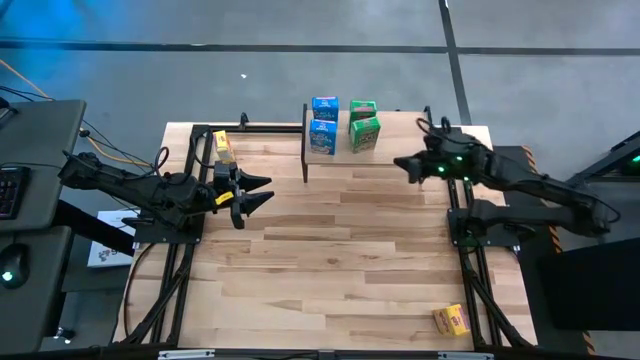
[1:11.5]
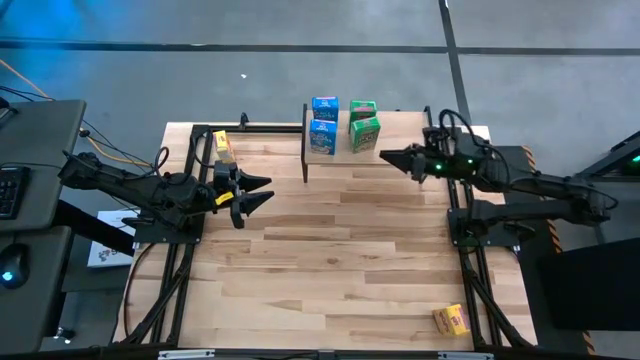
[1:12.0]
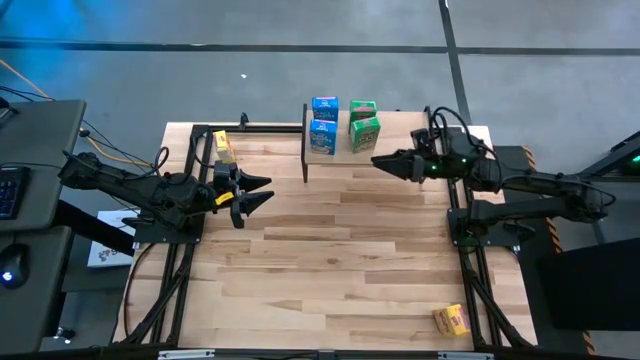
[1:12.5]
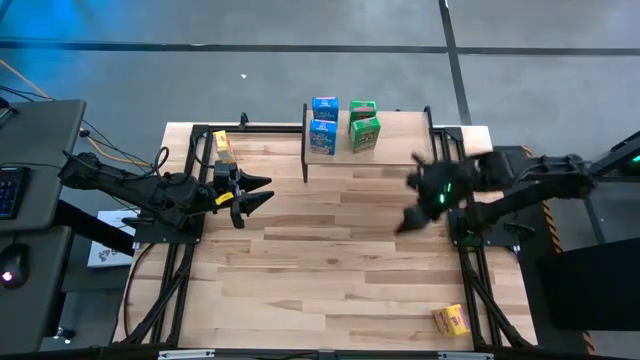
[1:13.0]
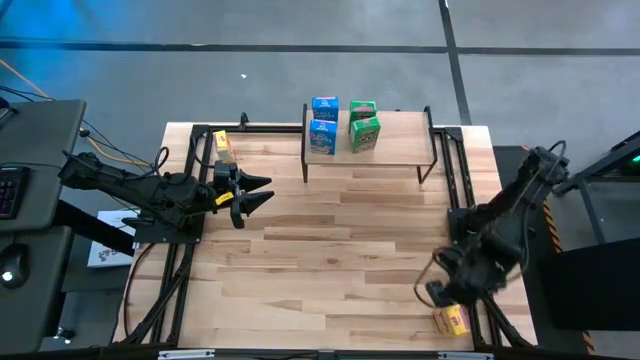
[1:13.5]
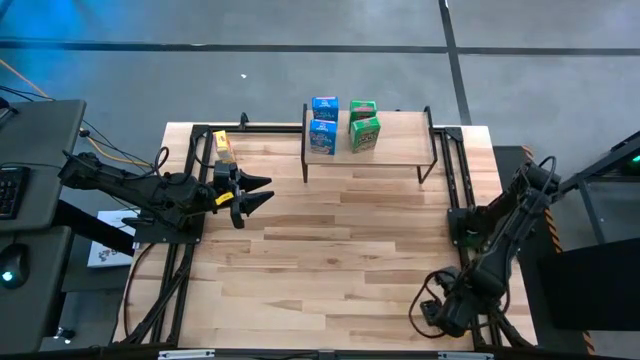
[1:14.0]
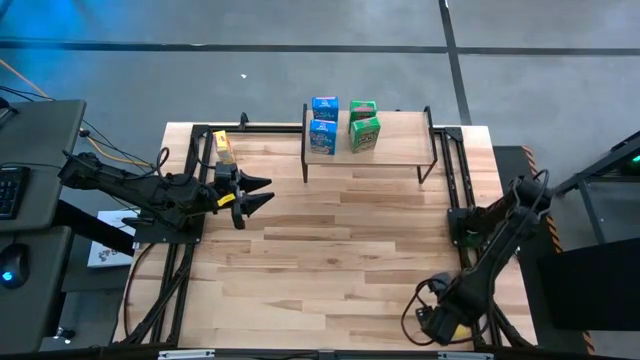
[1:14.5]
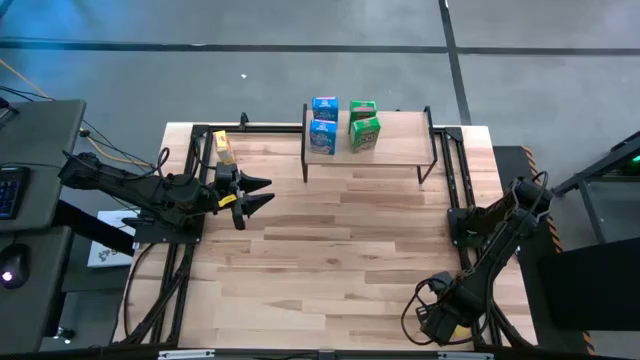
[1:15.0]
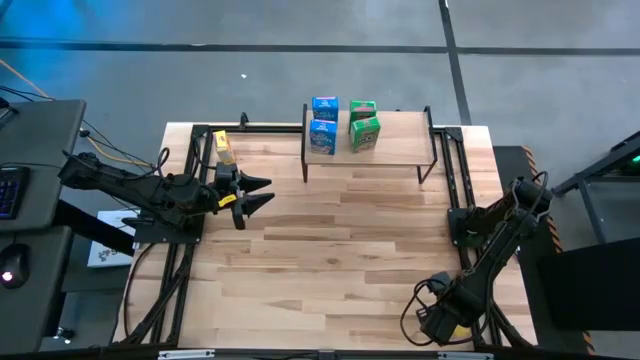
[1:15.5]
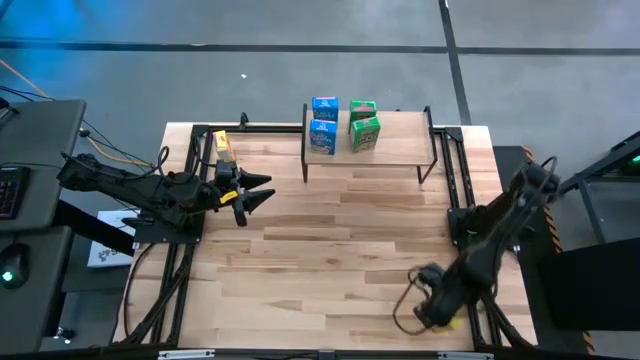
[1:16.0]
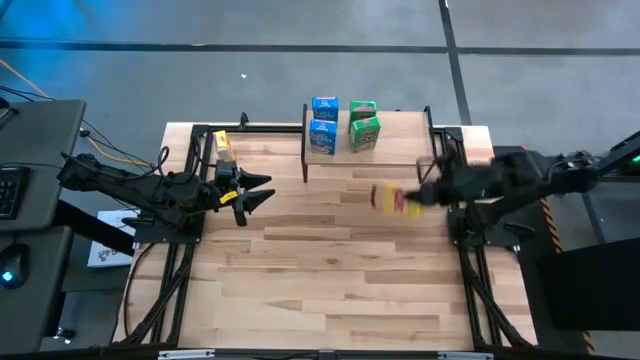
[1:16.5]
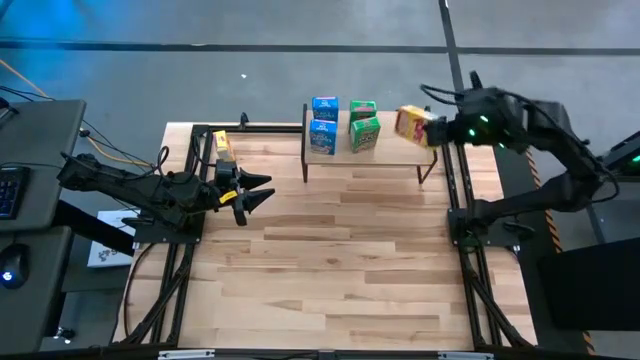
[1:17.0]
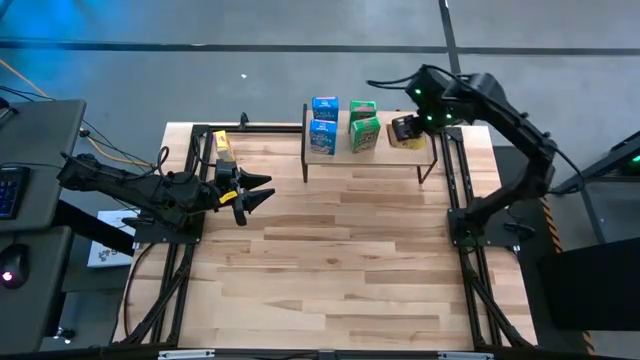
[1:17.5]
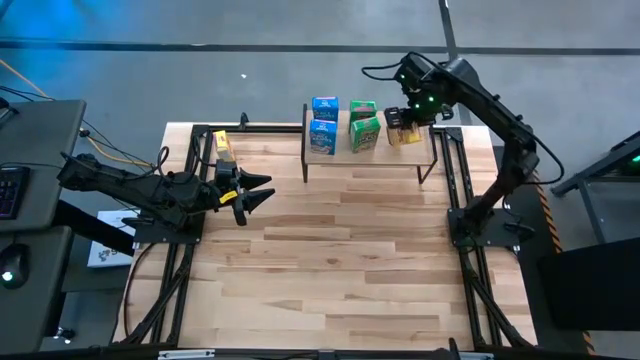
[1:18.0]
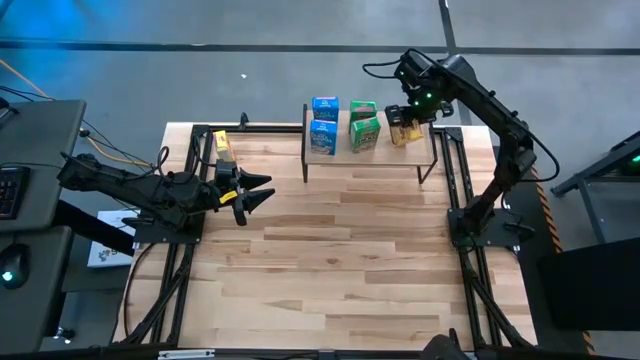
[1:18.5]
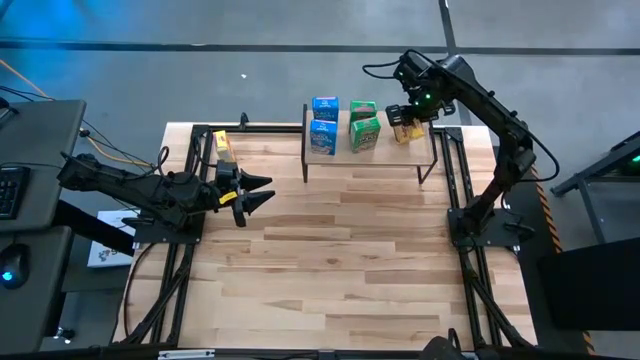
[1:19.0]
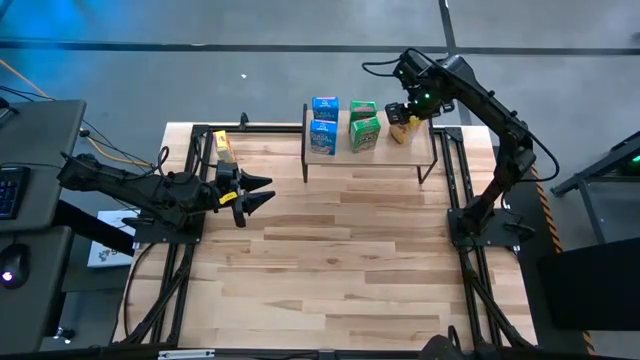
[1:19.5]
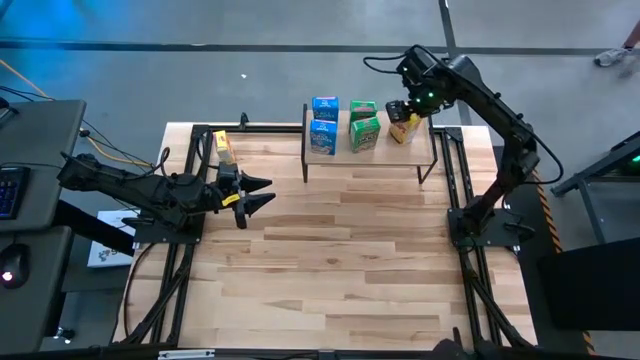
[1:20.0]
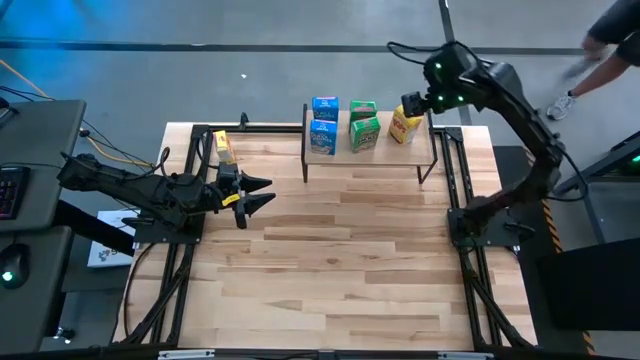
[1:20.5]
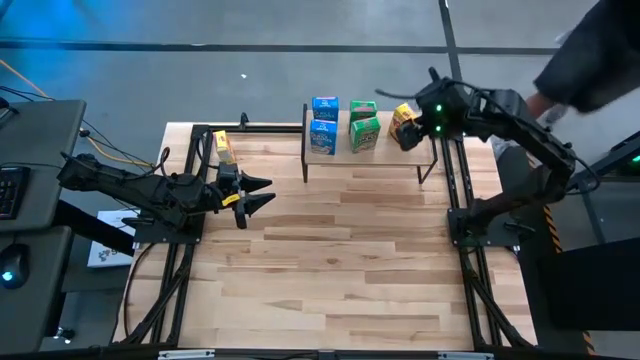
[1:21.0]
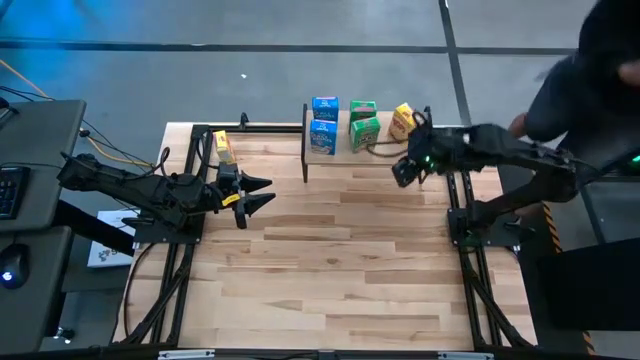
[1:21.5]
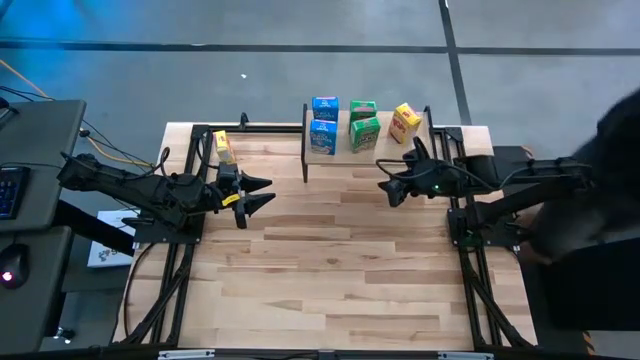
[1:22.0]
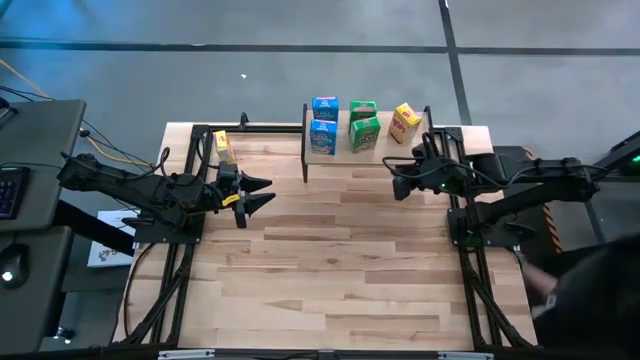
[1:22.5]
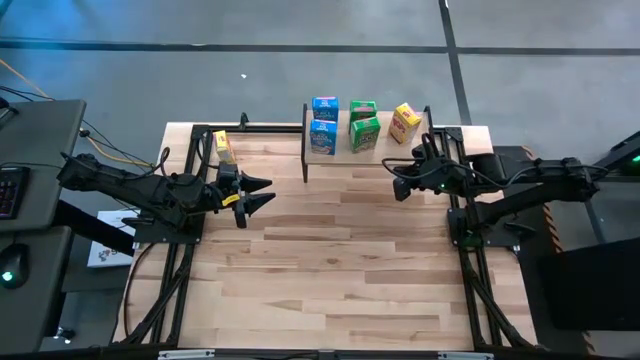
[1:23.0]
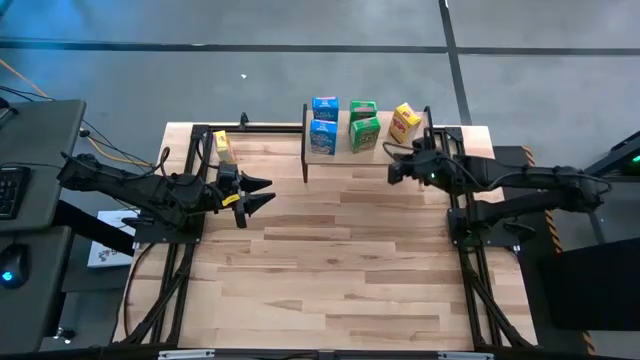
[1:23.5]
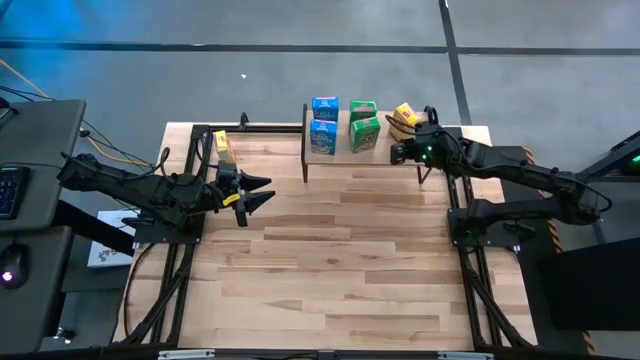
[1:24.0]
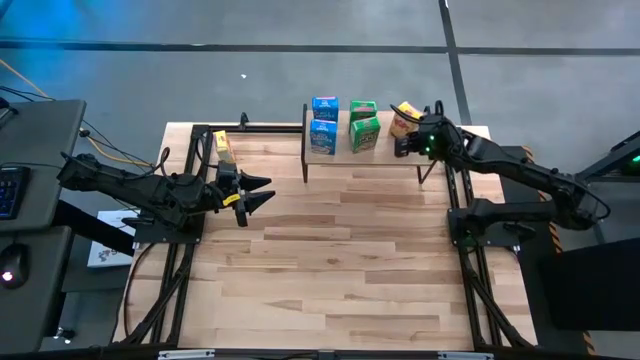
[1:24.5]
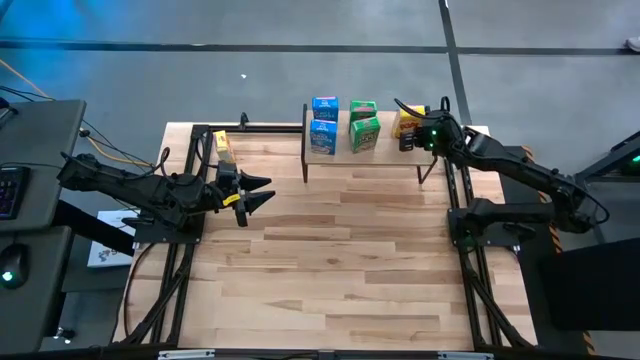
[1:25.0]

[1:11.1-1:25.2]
Task: Stack cereal on shelf
Put the bottom yellow cereal box on the shelf

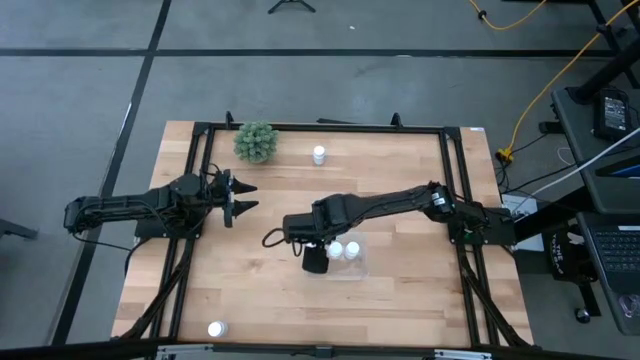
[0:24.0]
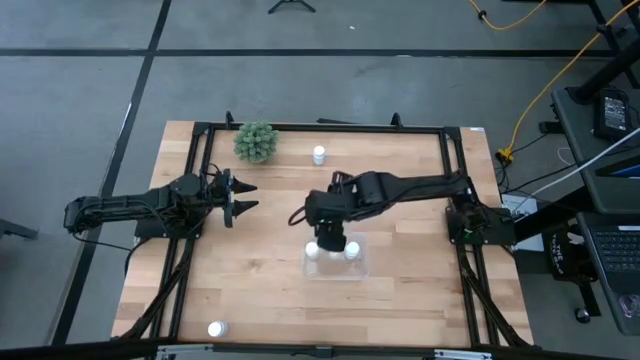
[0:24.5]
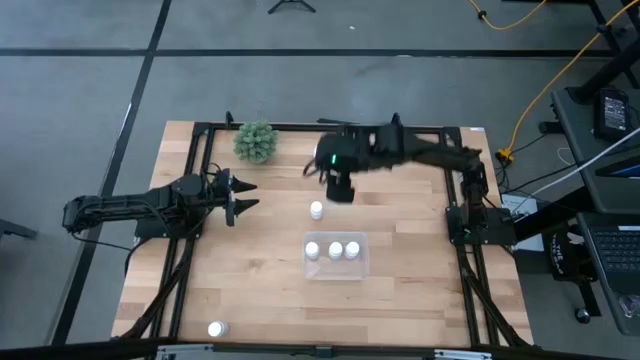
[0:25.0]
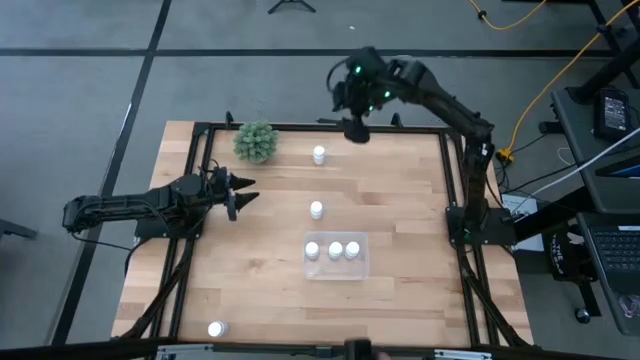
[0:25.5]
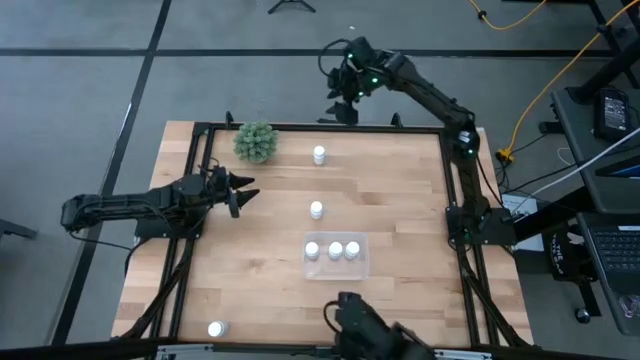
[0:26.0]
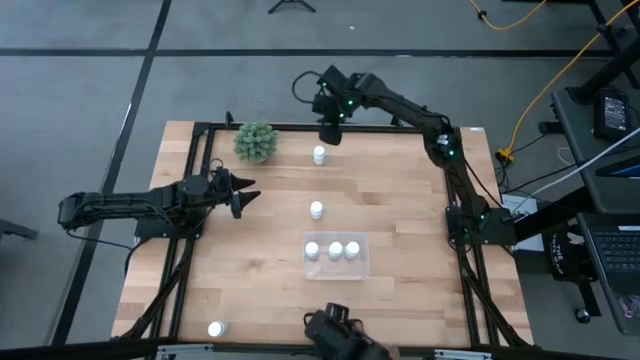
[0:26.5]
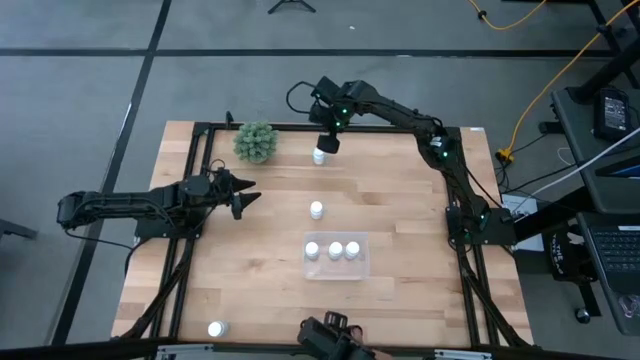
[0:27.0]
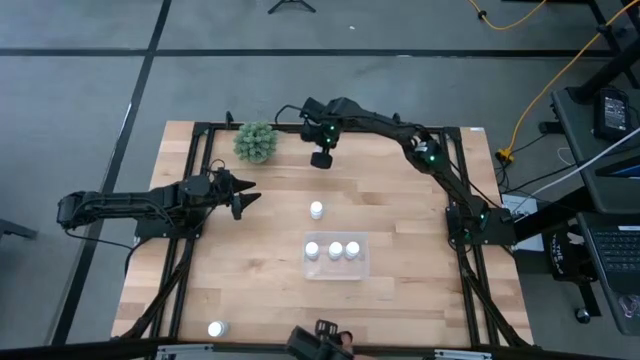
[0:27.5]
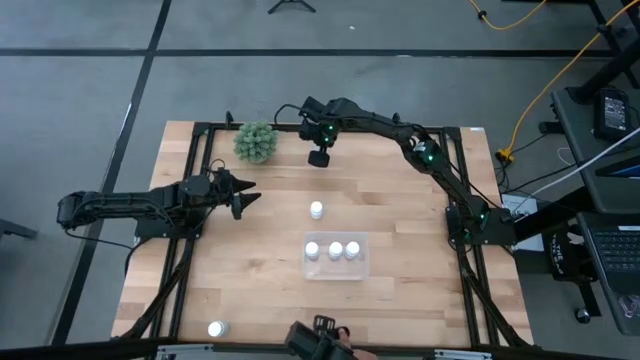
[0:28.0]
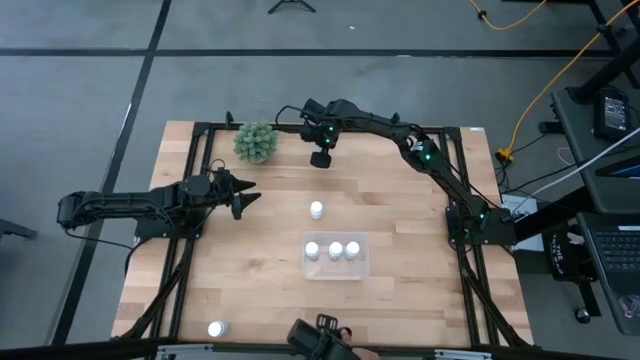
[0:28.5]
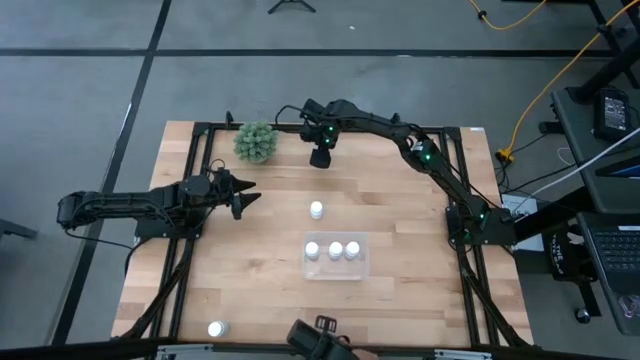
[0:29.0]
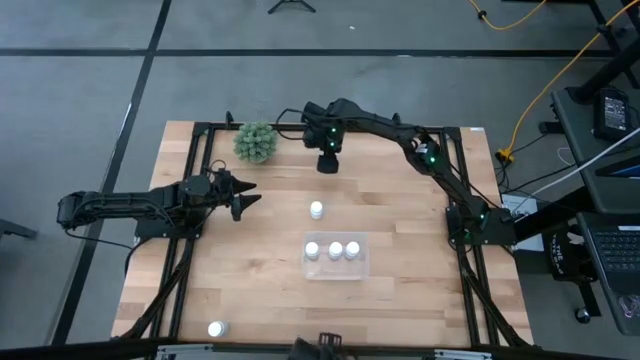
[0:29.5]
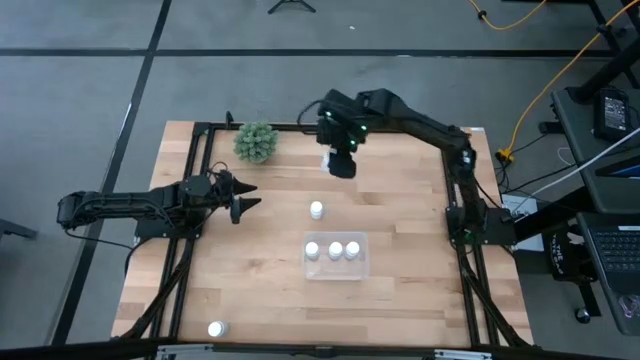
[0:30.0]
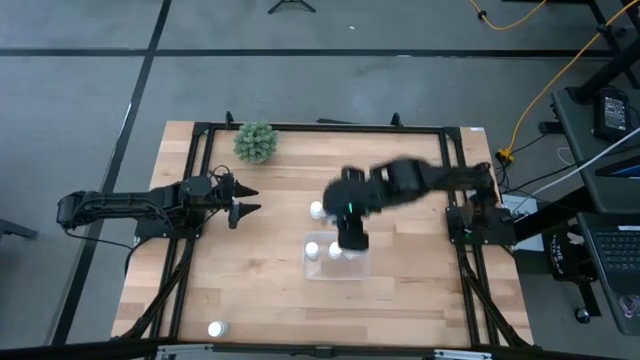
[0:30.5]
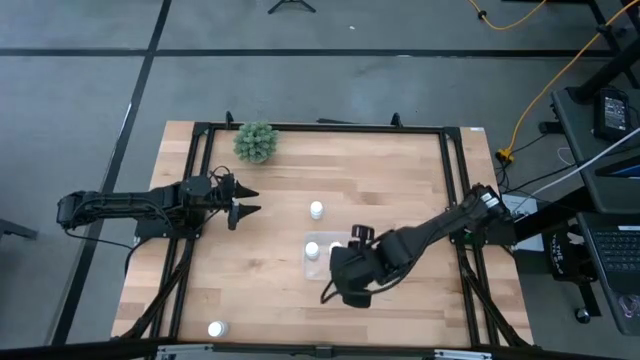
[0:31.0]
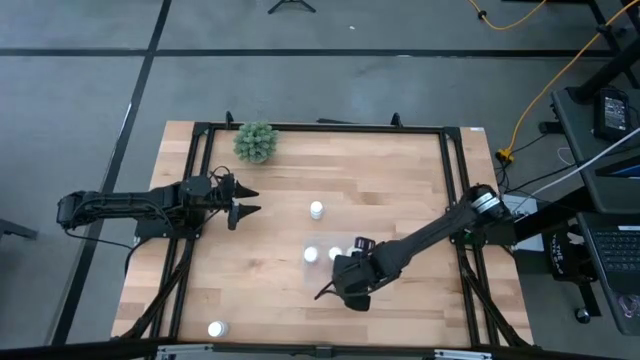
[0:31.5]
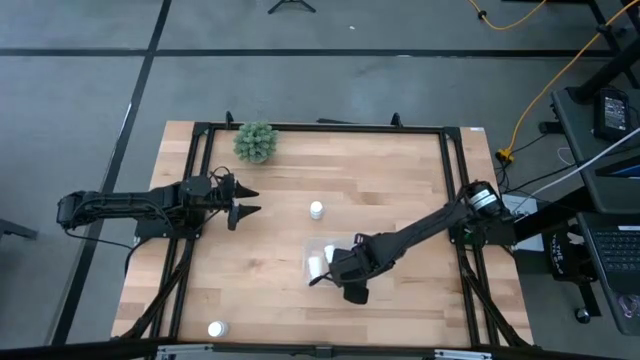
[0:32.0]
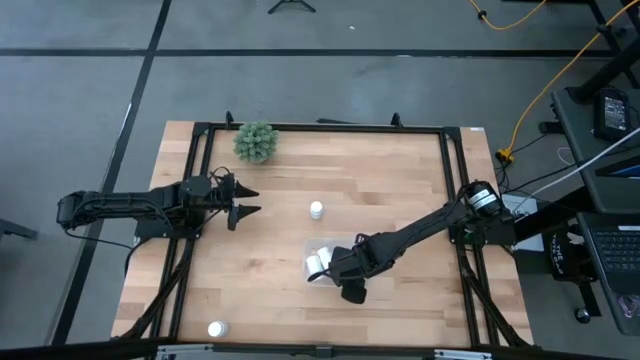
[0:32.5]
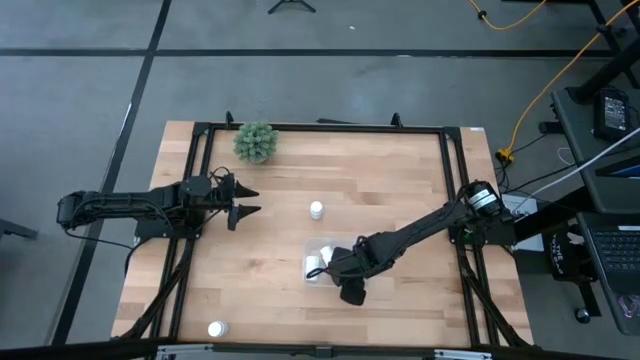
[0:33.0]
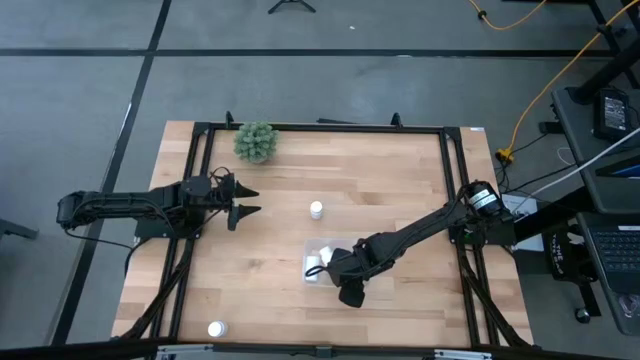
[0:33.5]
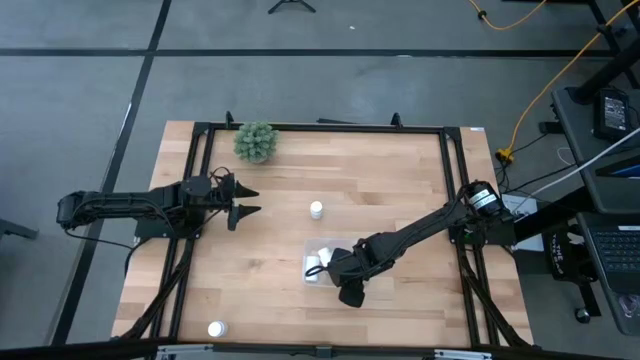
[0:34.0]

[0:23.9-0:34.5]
Task: Pick and place pill bottles into a basket
Put the white medicine bottle into the transparent bin
